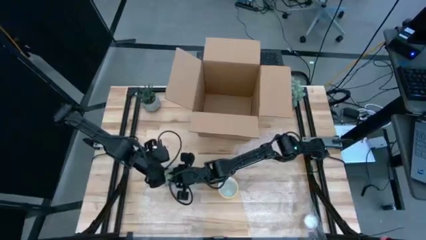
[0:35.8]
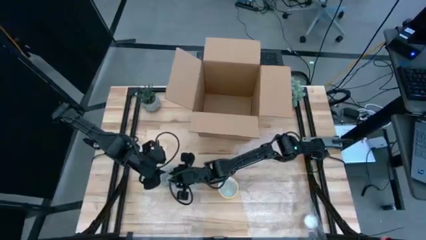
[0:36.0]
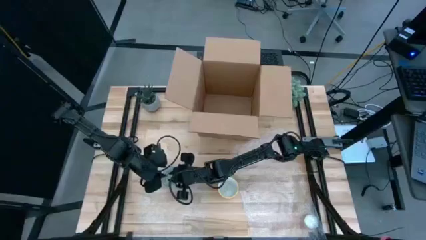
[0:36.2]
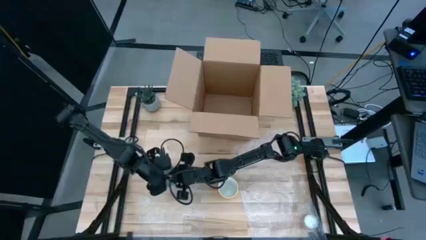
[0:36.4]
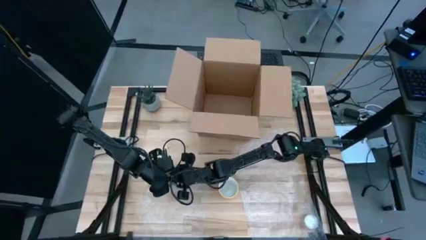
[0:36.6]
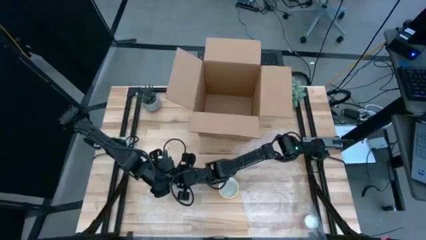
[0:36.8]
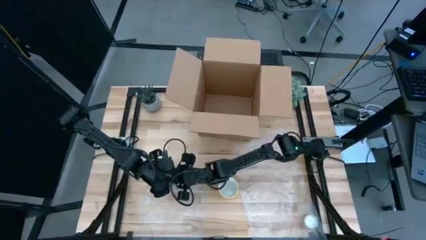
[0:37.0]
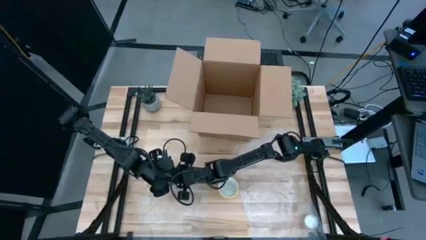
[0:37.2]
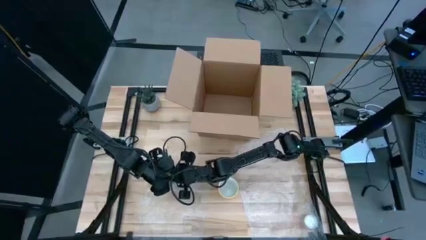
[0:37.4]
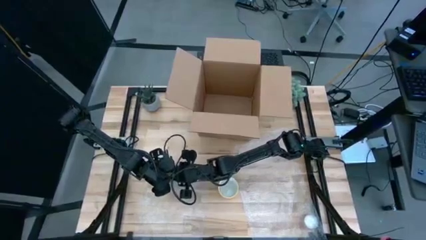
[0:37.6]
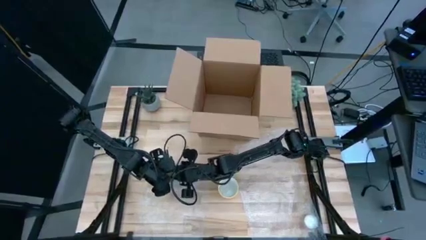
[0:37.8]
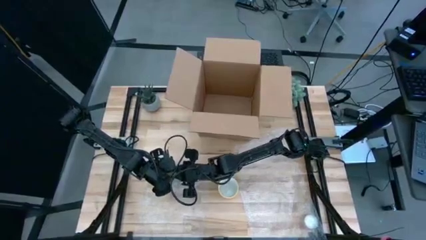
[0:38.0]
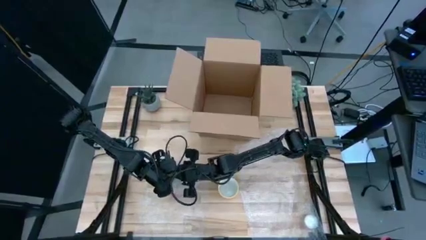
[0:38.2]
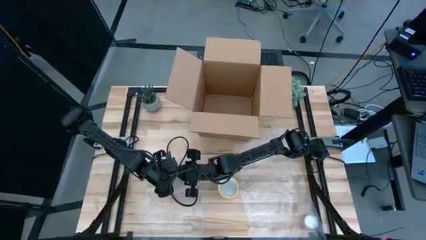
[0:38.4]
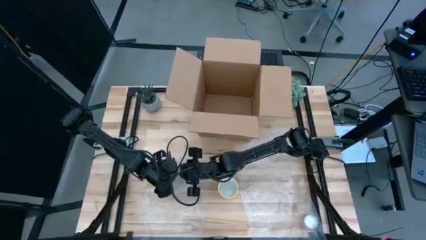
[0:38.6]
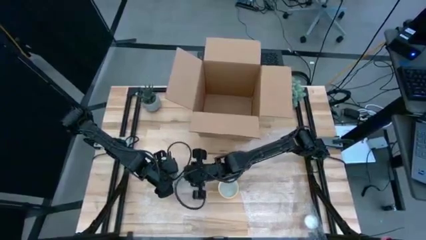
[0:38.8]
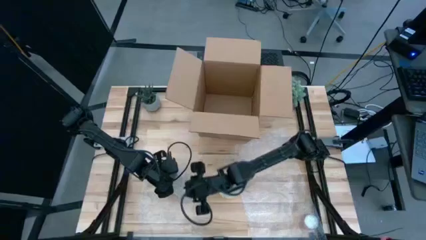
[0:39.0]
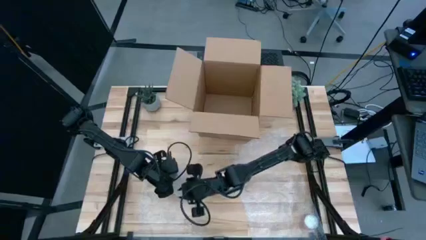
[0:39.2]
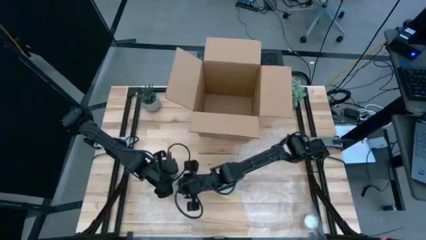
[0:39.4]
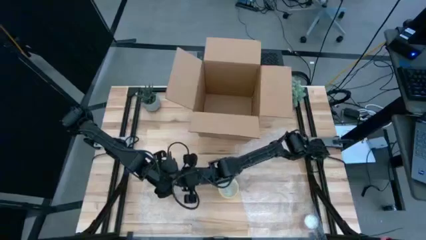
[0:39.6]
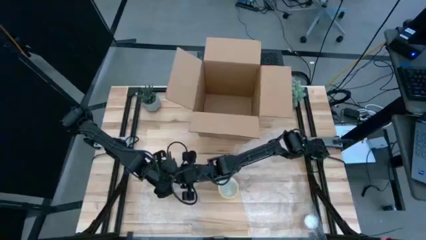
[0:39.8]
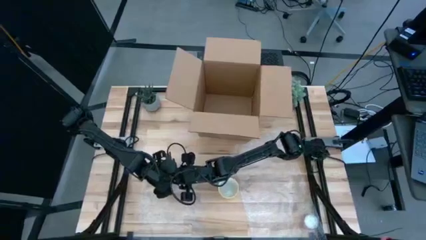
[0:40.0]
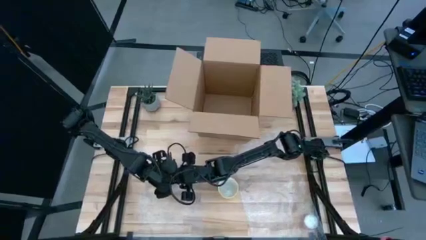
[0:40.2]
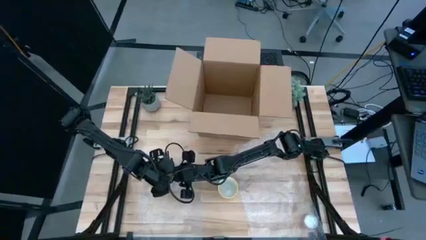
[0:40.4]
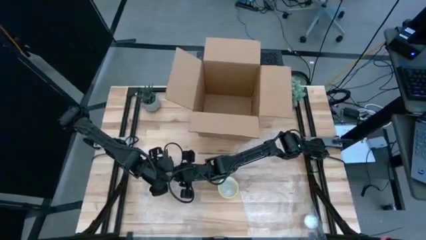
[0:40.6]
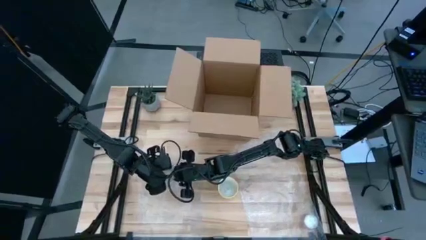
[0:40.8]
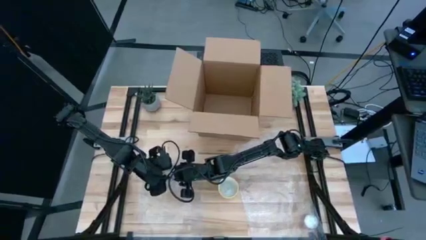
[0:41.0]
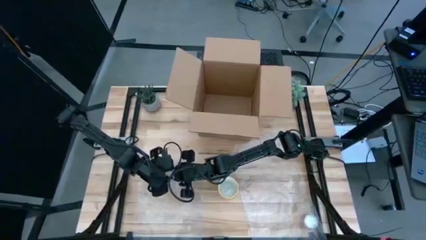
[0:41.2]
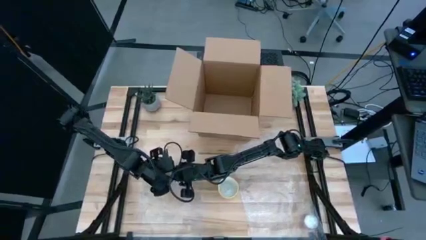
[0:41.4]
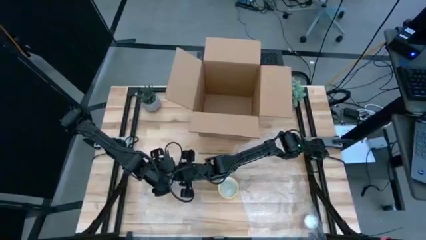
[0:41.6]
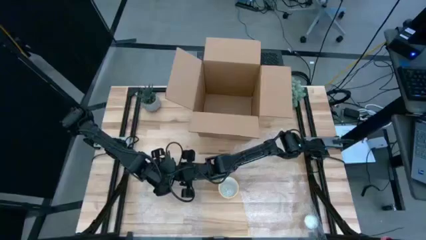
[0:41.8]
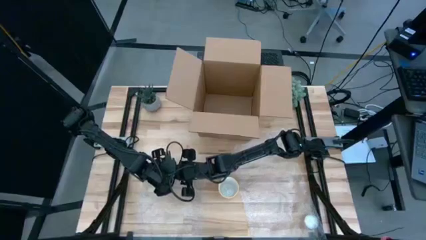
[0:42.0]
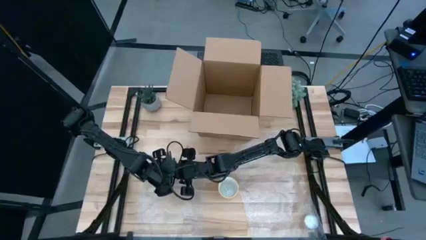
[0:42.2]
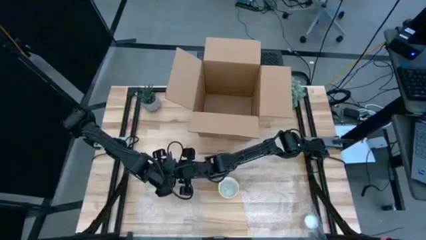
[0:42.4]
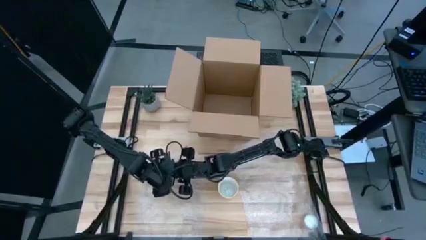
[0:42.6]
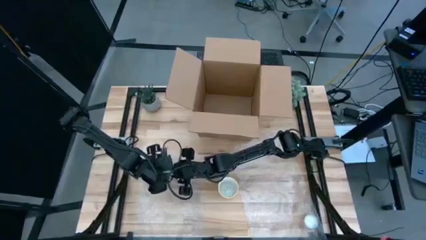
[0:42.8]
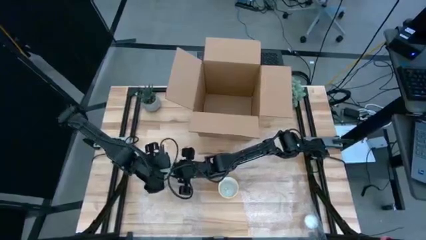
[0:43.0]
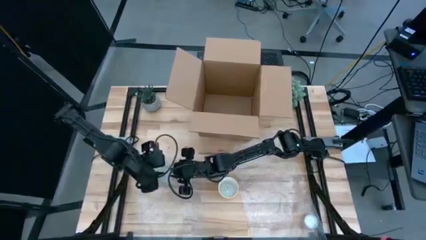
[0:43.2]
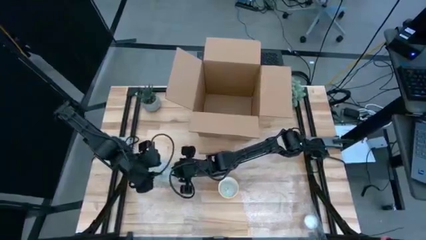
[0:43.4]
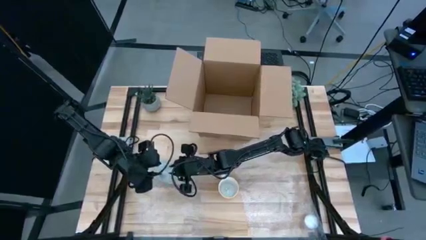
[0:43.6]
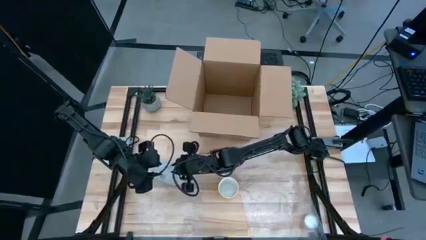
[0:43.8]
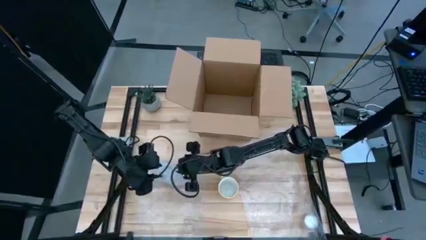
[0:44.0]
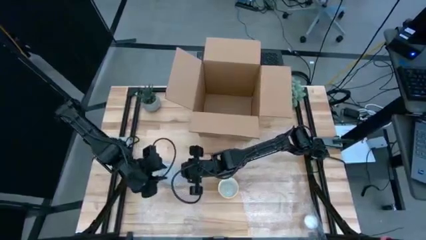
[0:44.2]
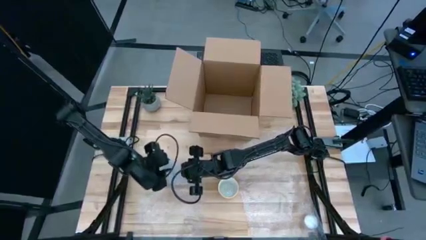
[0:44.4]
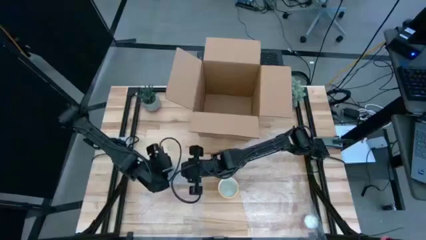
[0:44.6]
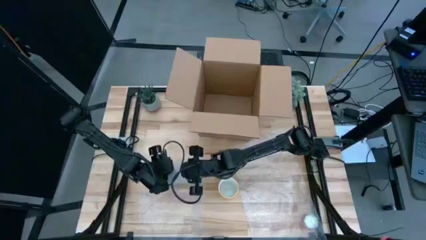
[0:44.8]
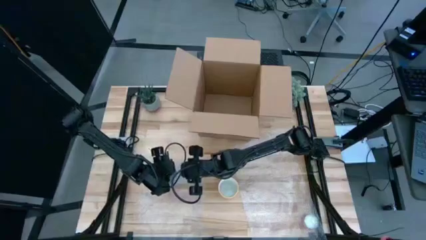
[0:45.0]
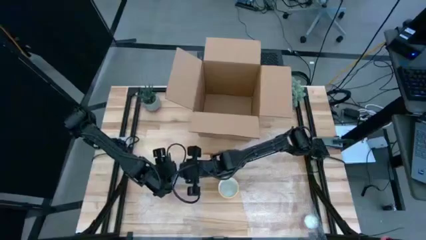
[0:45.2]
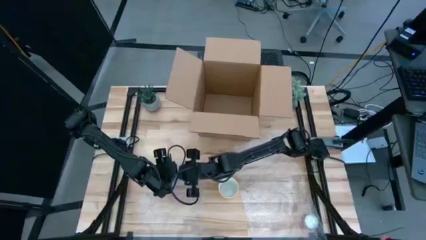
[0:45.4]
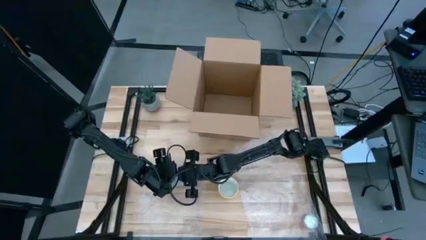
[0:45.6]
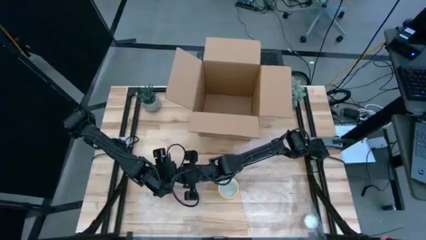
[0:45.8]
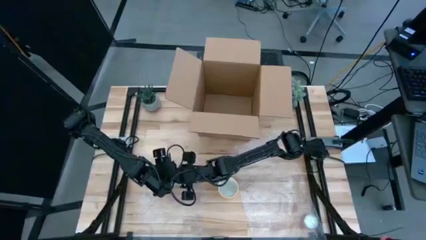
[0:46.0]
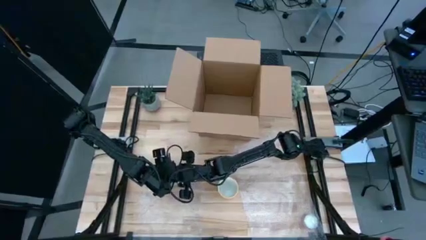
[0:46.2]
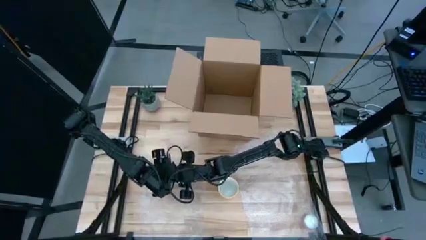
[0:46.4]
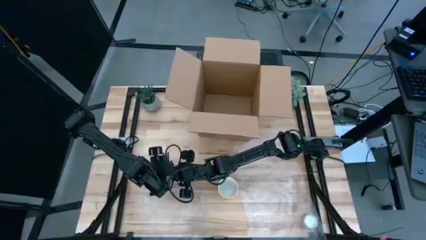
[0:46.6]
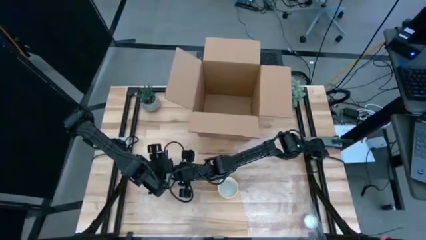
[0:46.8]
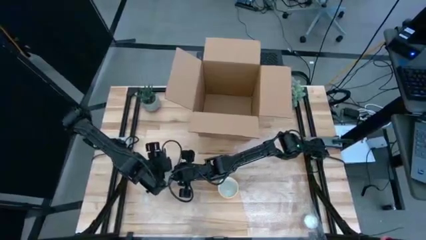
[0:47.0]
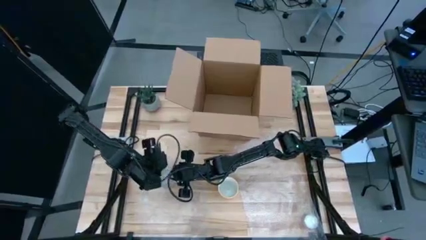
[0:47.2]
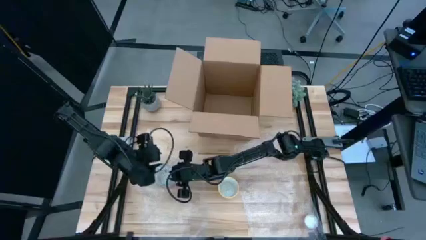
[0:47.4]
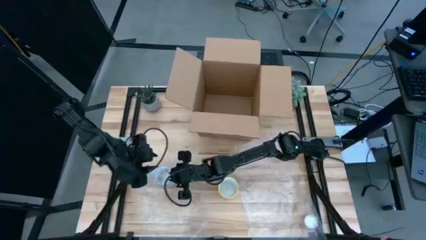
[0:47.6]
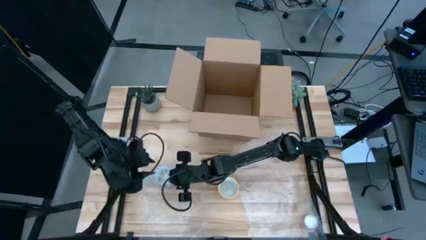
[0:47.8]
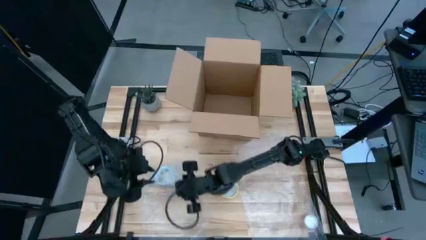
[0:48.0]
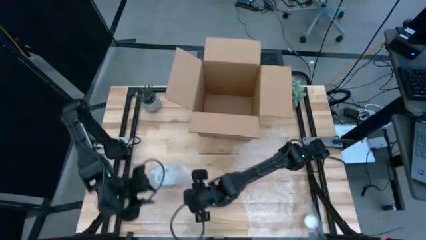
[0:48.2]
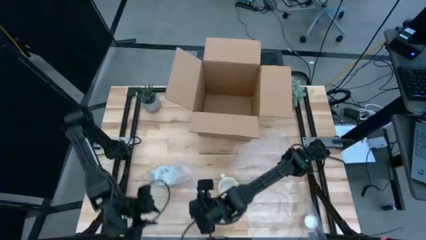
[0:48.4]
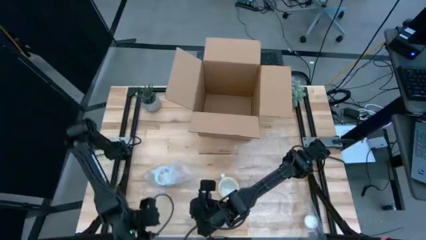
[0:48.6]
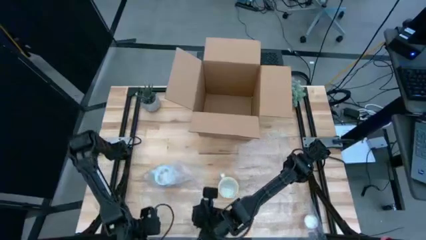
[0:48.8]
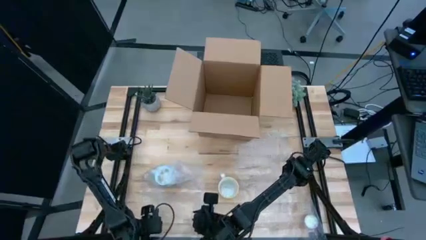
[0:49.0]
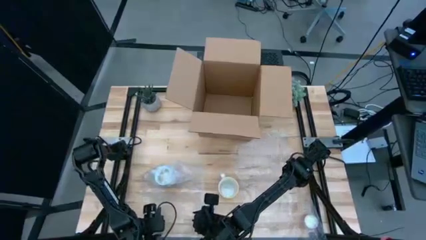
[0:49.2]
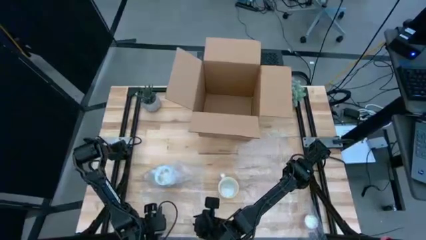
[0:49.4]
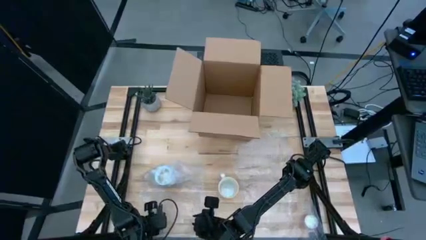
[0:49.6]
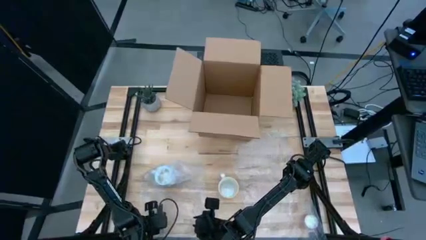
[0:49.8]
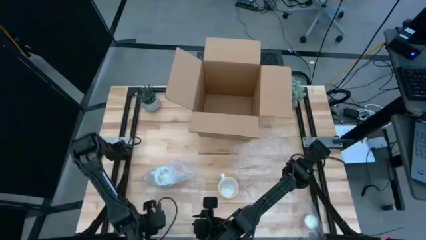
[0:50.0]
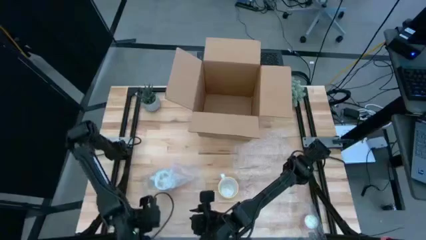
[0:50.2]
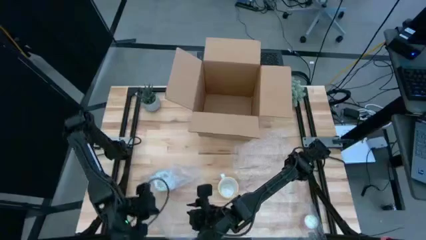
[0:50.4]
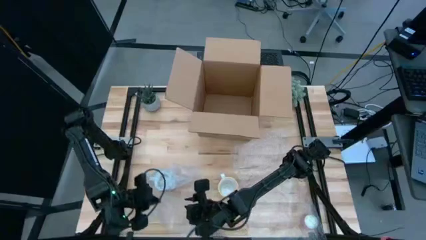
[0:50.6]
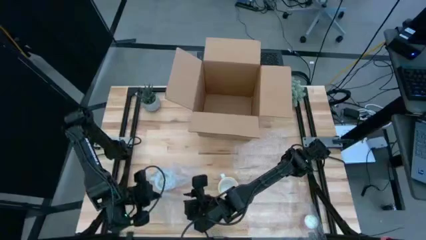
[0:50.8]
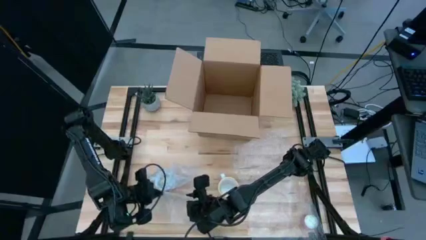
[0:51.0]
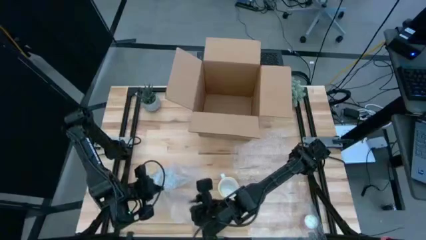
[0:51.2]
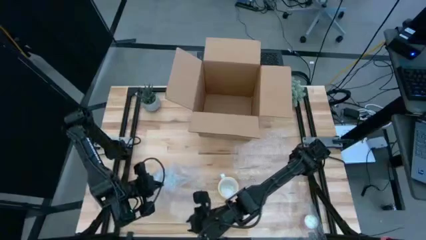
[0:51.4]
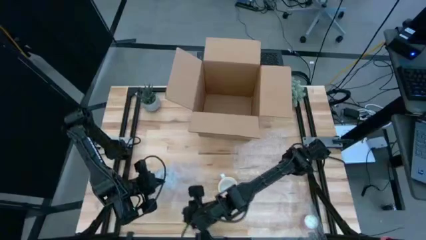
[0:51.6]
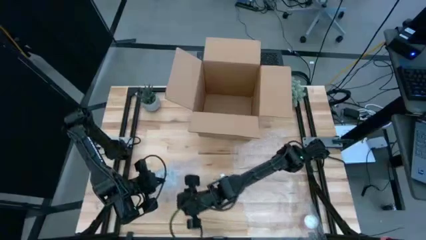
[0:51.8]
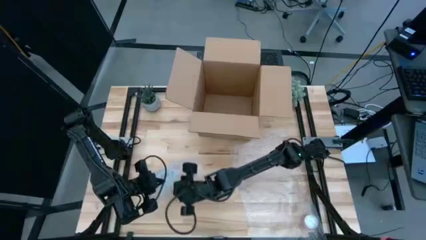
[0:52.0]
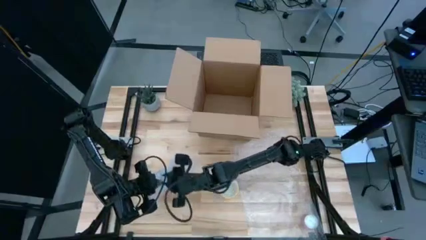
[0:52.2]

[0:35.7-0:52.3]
Task: wrap mug
Wrap the red mug with the bubble wrap
